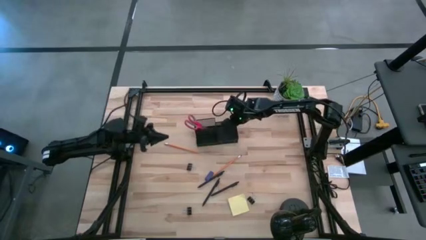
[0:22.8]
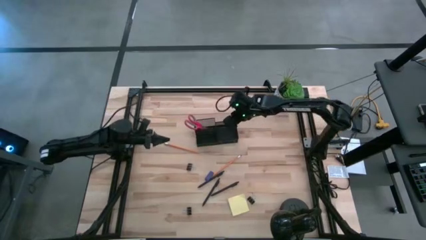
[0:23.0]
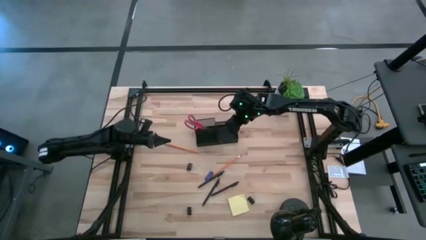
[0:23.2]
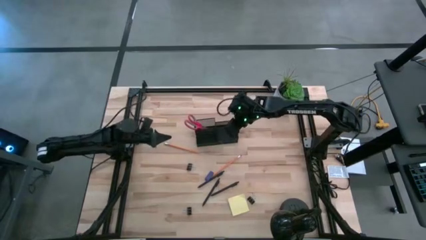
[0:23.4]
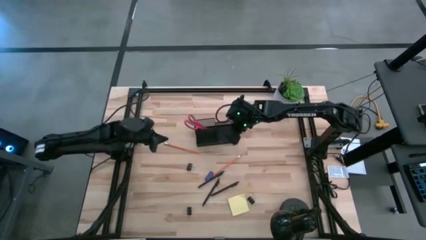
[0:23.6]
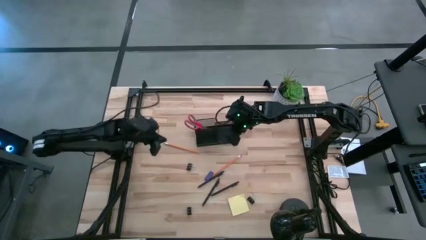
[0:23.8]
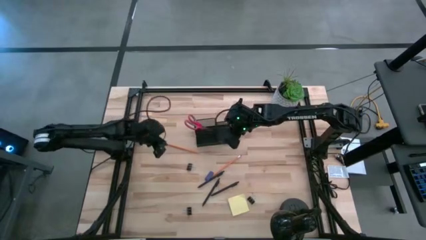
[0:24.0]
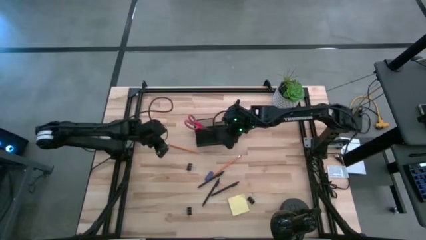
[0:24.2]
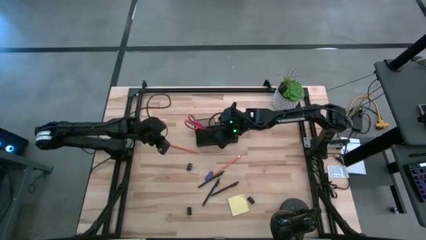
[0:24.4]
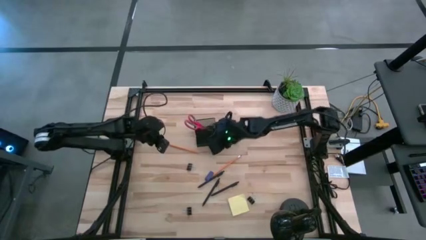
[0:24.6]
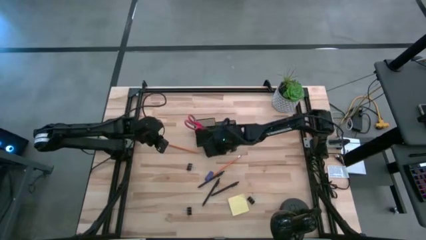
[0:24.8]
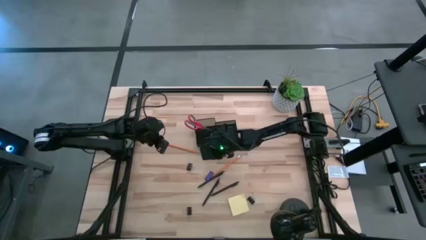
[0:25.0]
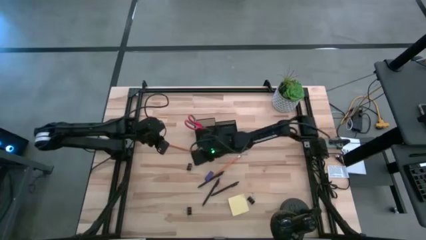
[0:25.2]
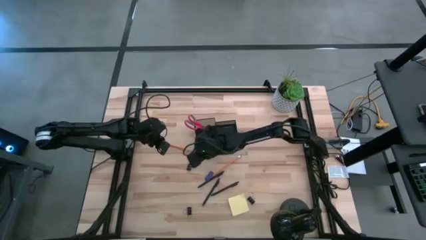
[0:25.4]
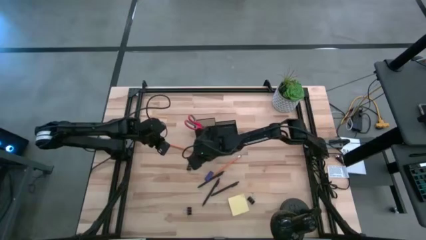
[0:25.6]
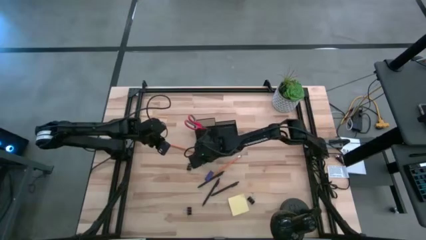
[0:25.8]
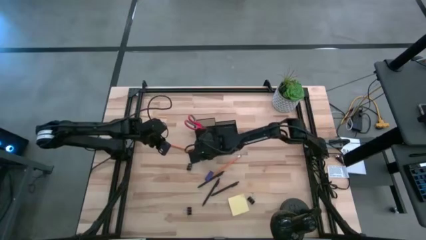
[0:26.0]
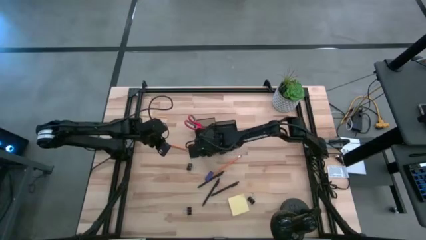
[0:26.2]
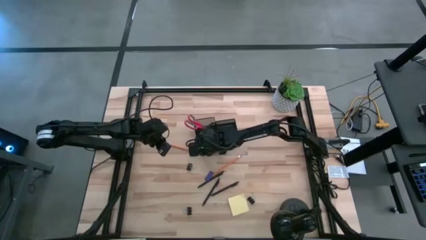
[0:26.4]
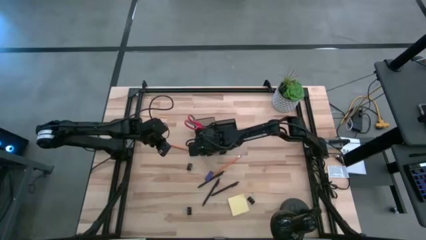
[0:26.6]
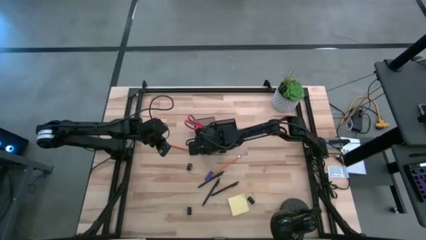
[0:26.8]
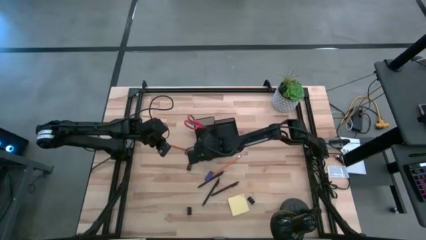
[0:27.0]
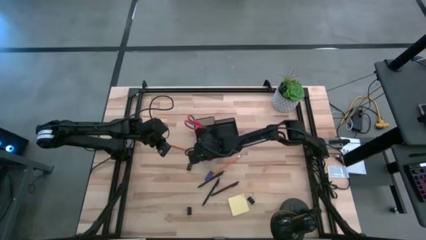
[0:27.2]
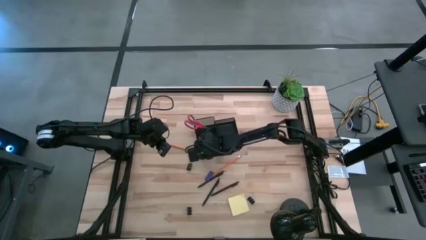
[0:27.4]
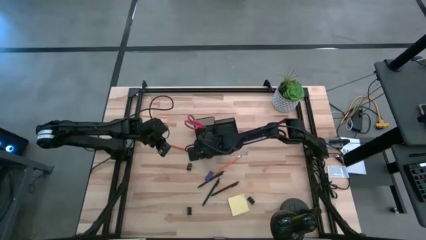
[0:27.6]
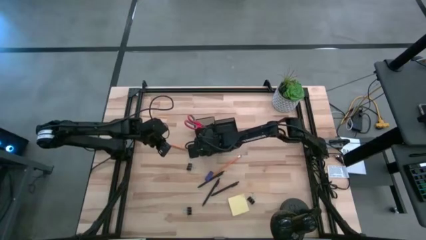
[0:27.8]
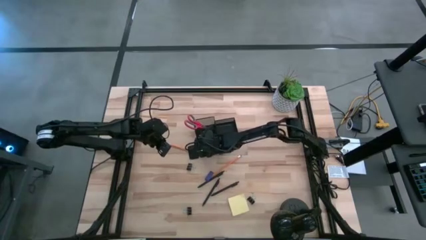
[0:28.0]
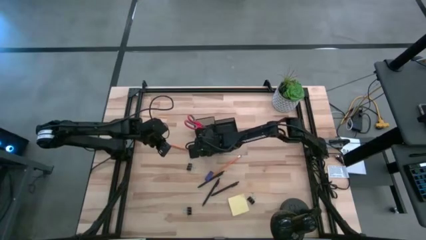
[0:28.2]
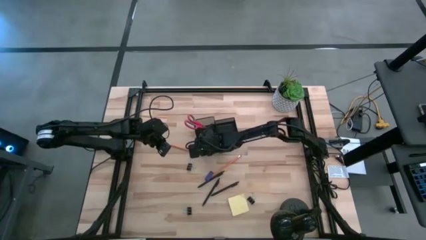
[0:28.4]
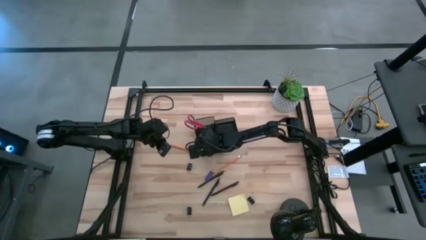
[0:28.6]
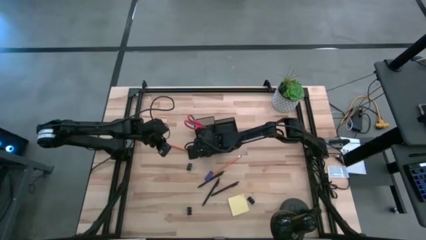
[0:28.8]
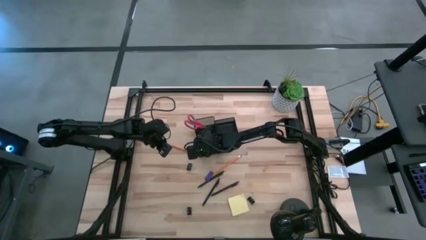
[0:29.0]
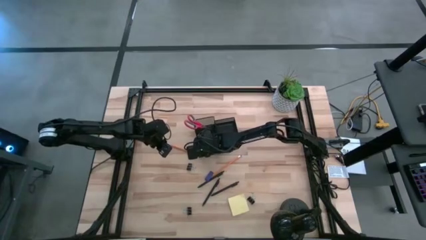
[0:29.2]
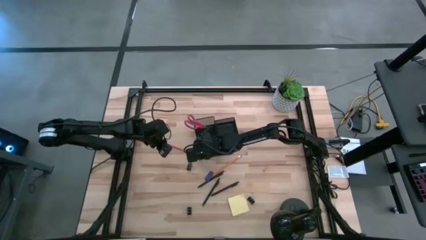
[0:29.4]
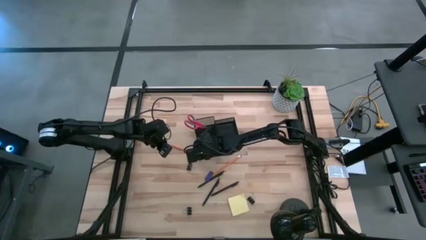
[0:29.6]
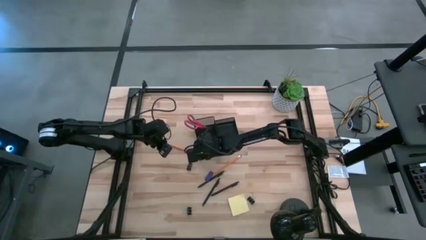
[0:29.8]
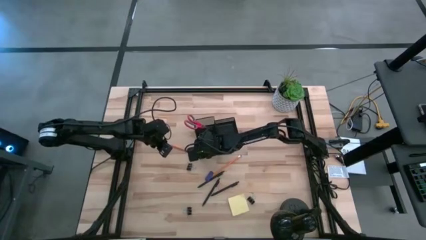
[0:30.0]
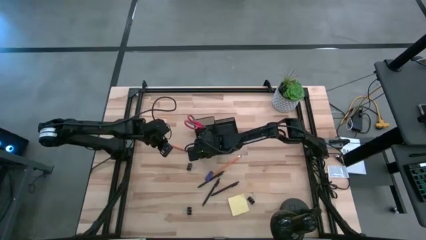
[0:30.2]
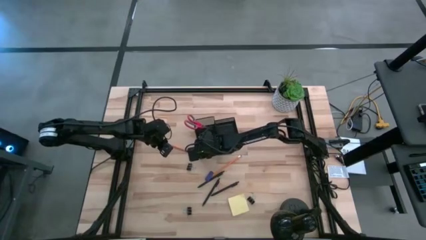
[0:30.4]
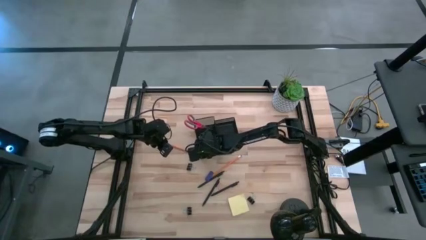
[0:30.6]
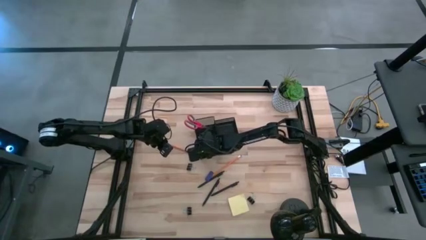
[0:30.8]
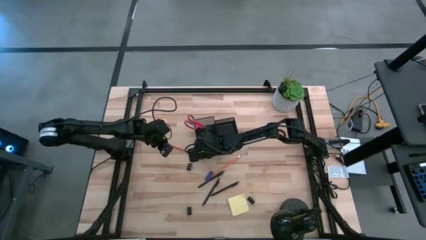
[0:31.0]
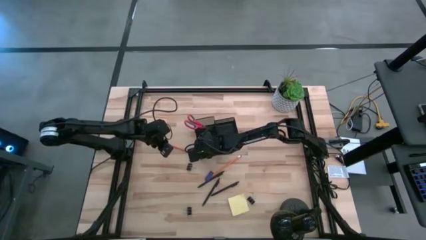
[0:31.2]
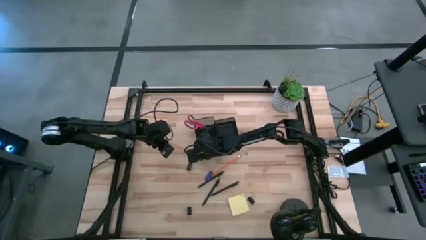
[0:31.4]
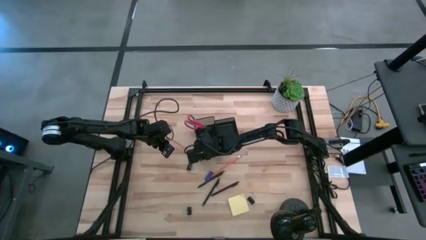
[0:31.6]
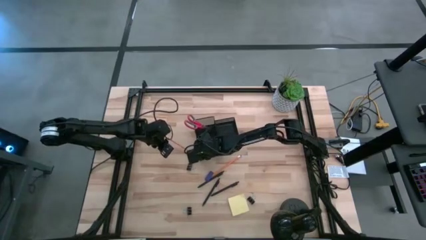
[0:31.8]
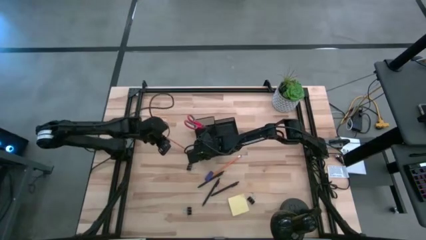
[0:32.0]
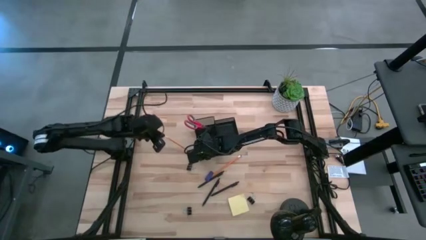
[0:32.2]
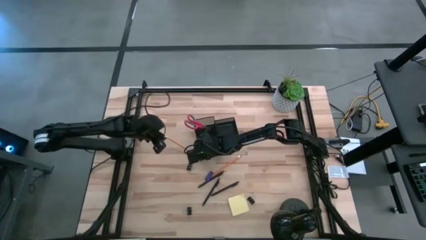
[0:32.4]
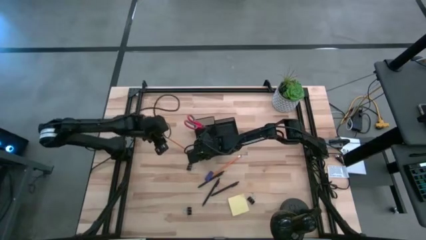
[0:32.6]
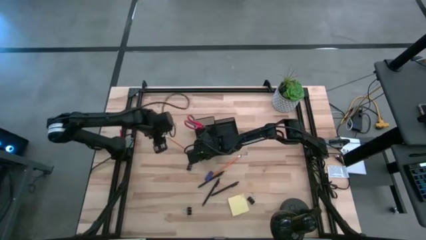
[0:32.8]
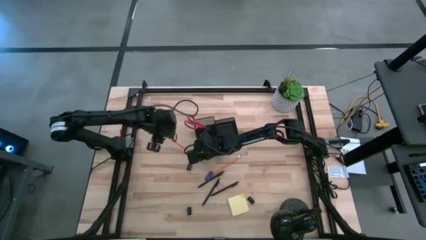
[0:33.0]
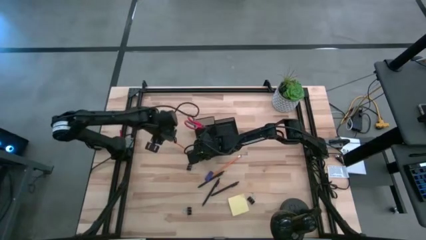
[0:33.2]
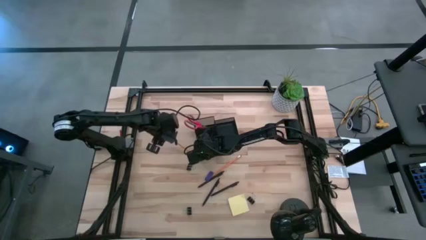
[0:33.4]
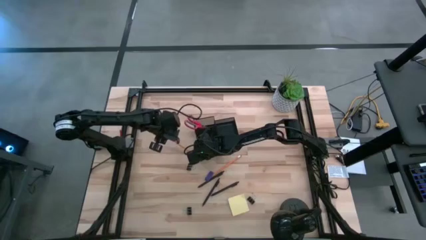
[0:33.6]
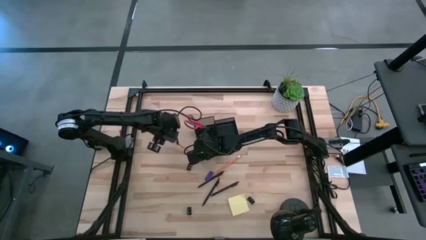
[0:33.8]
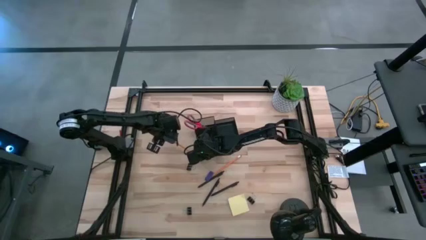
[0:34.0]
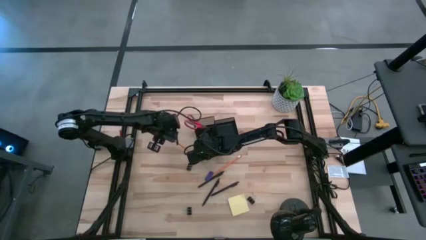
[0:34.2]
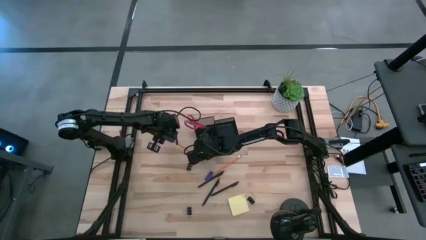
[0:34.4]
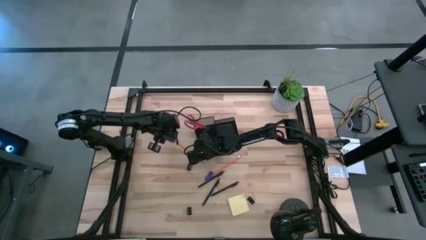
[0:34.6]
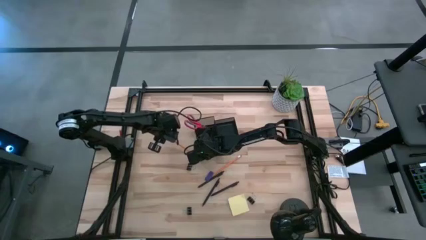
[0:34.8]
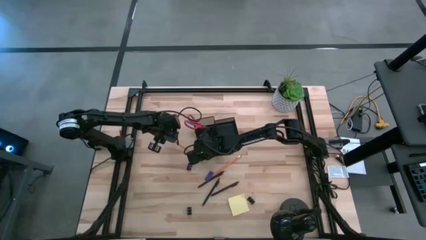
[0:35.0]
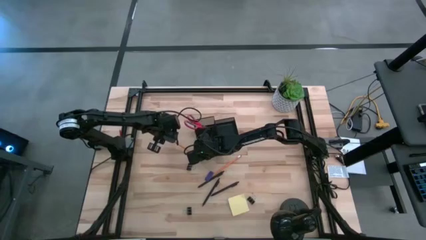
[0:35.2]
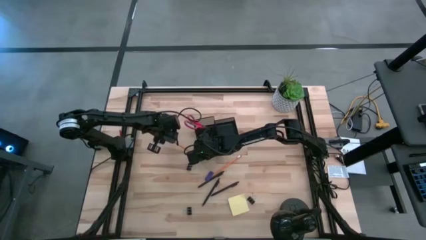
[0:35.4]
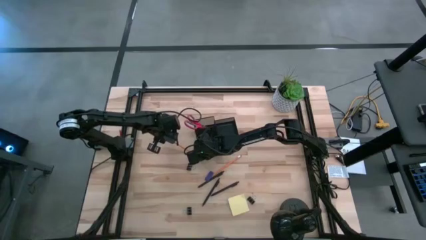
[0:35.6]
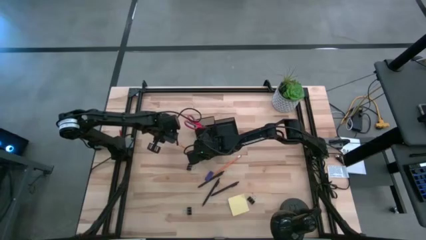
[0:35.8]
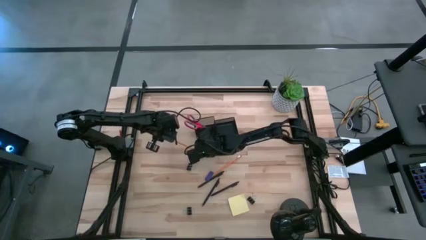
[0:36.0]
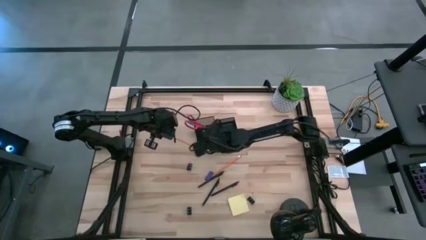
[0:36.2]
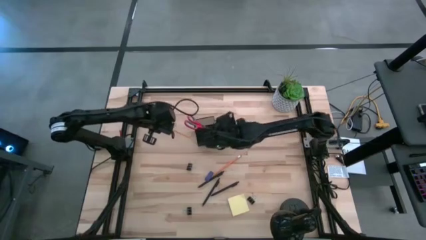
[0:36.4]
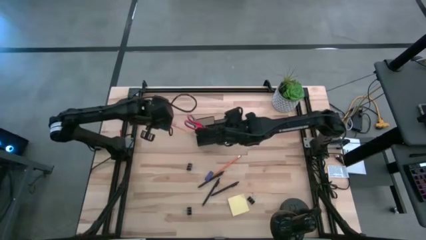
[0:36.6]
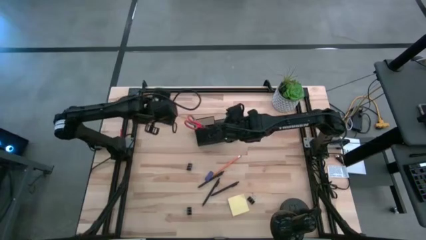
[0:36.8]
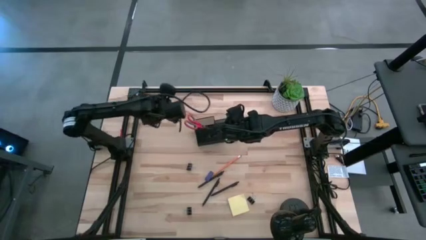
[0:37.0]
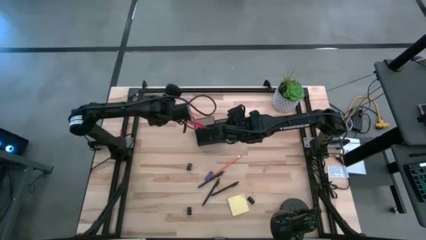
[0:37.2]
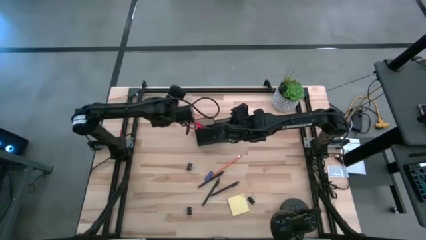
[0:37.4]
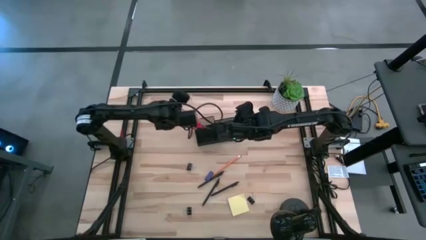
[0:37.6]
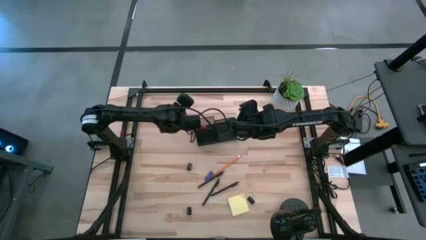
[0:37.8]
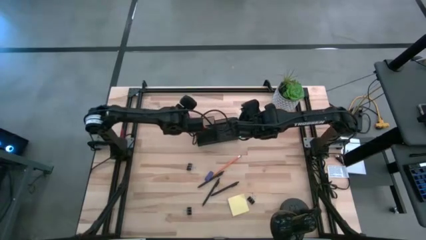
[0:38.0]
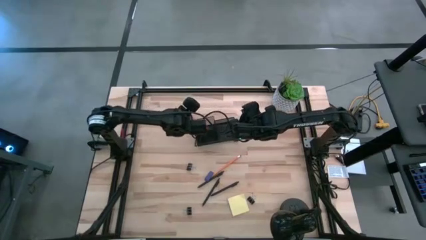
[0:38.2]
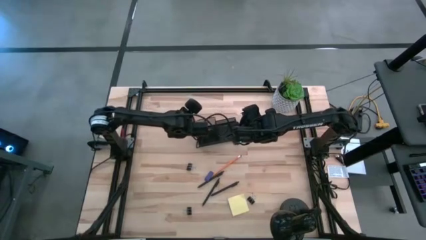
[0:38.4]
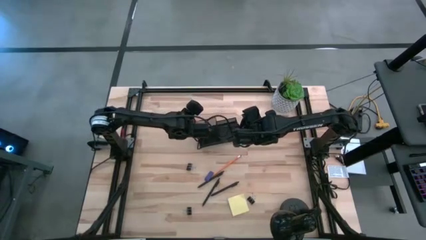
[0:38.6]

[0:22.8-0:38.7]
Task: Pick and place office supplies into organizer
Put the left pencil into the top left section of the desk organizer
